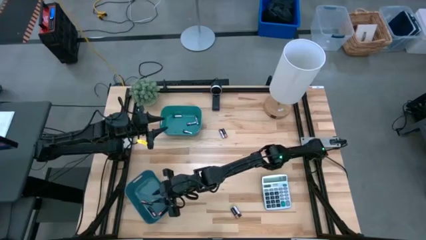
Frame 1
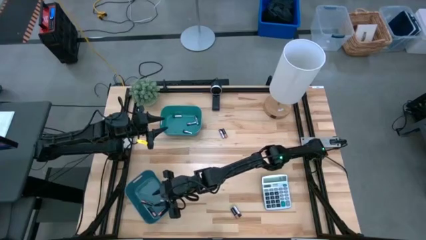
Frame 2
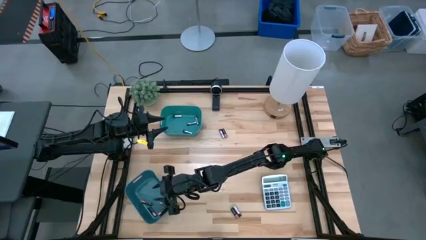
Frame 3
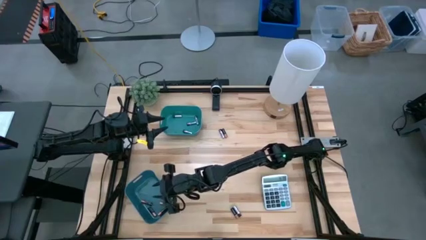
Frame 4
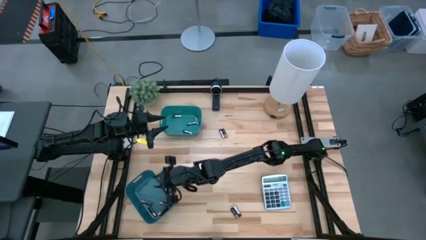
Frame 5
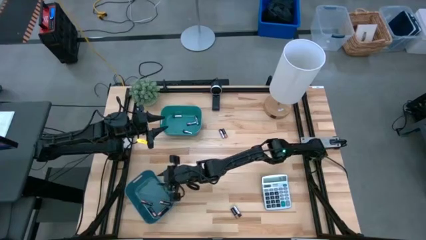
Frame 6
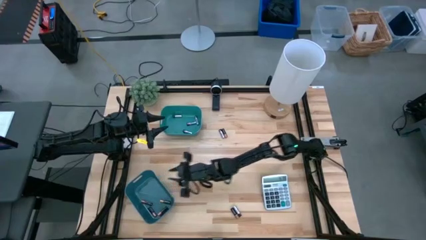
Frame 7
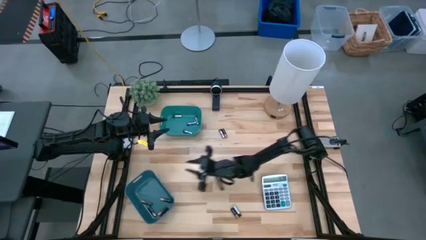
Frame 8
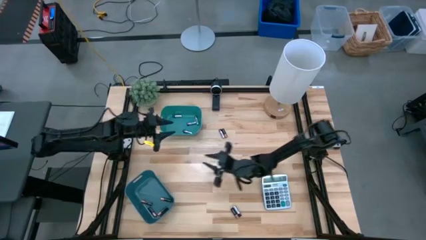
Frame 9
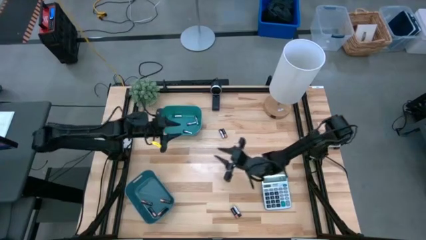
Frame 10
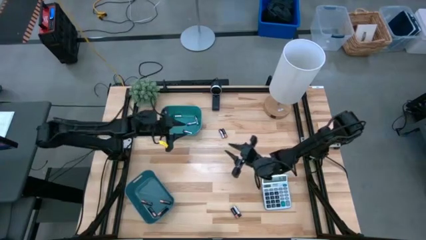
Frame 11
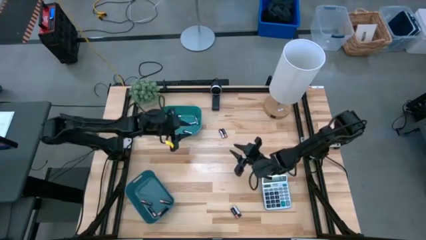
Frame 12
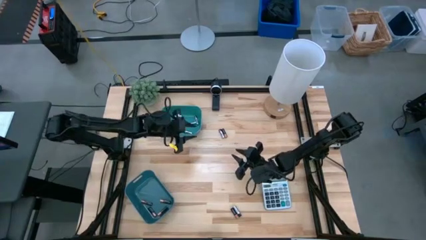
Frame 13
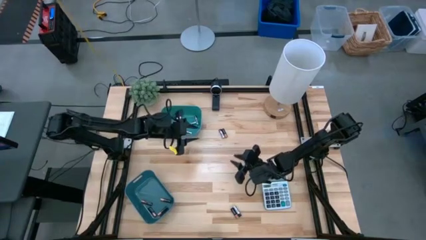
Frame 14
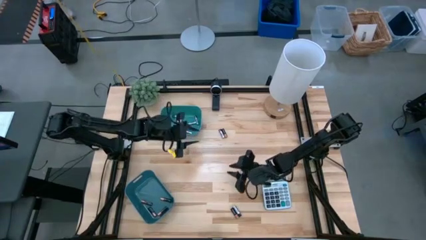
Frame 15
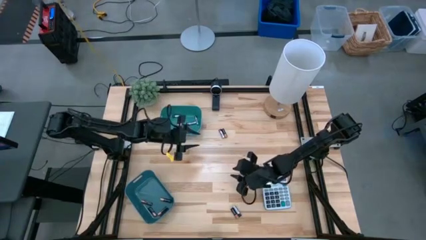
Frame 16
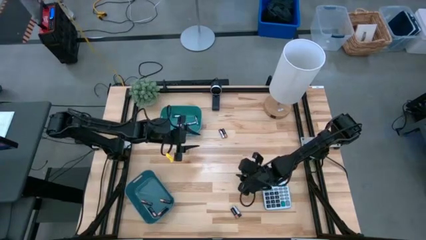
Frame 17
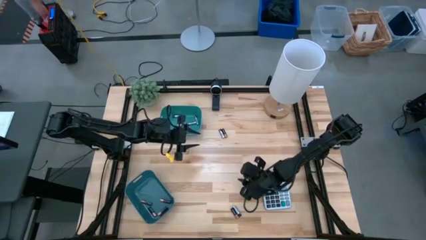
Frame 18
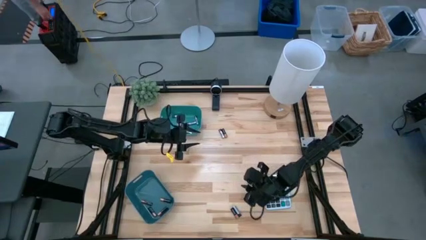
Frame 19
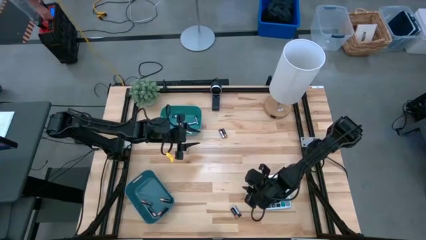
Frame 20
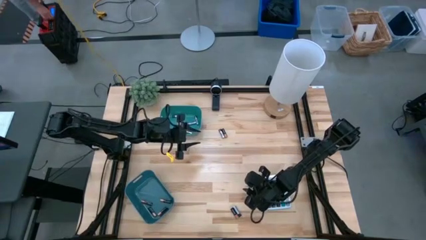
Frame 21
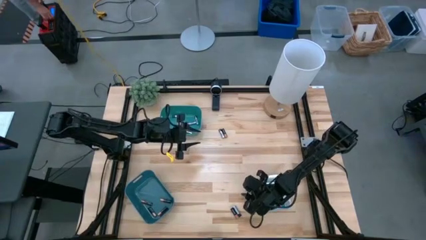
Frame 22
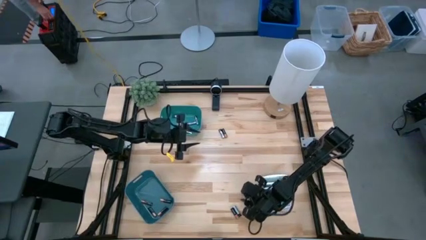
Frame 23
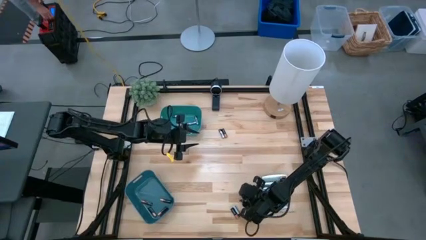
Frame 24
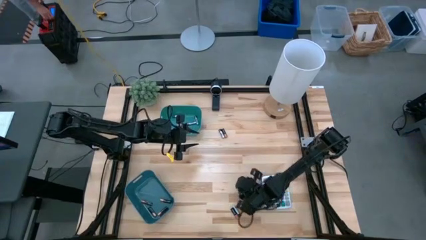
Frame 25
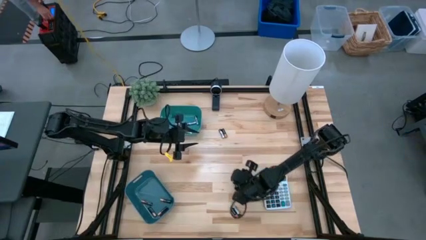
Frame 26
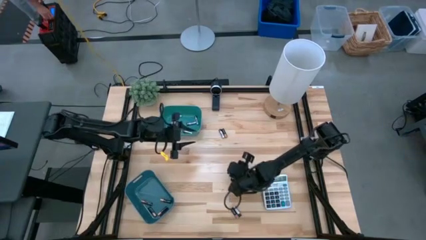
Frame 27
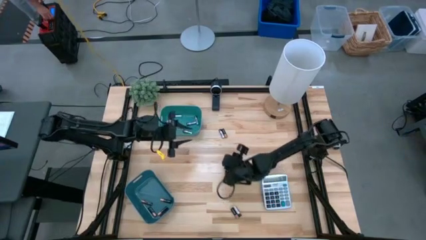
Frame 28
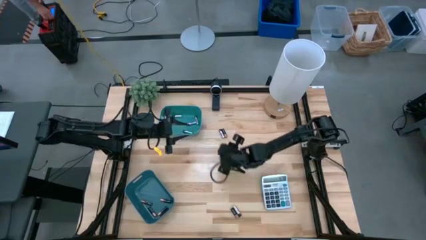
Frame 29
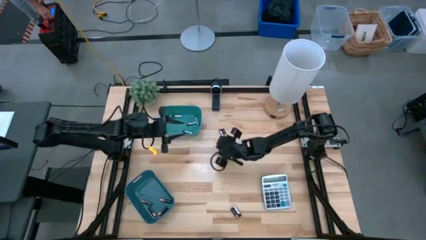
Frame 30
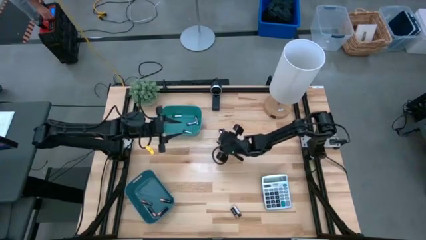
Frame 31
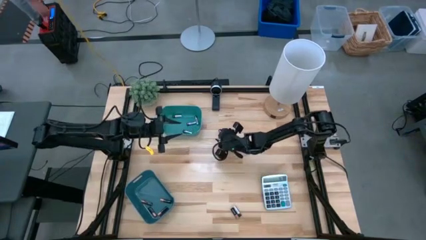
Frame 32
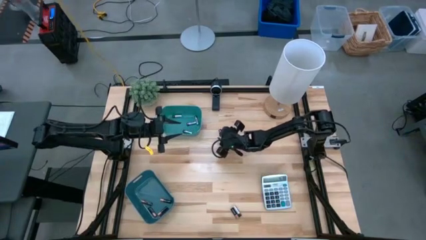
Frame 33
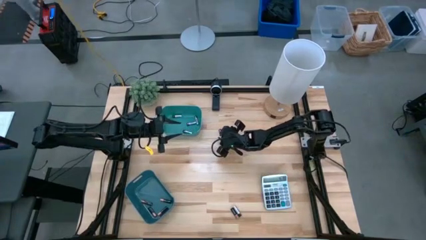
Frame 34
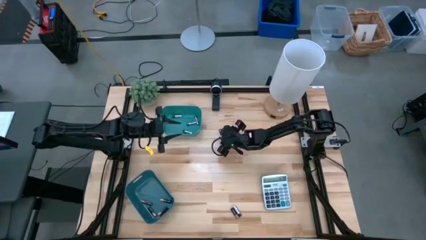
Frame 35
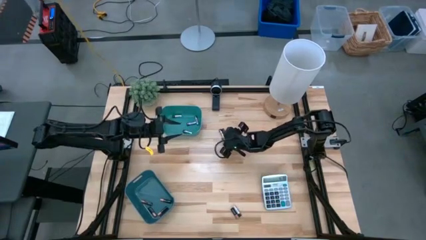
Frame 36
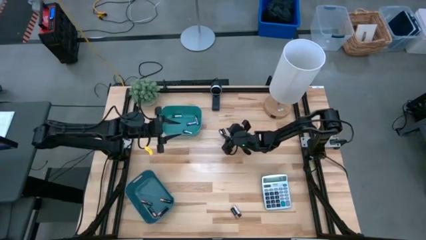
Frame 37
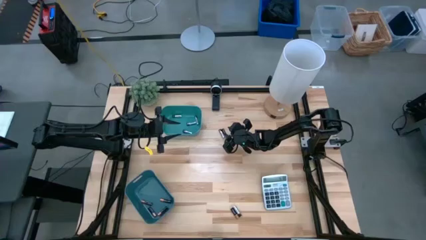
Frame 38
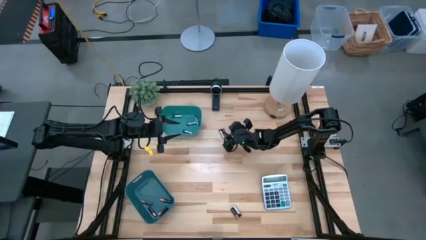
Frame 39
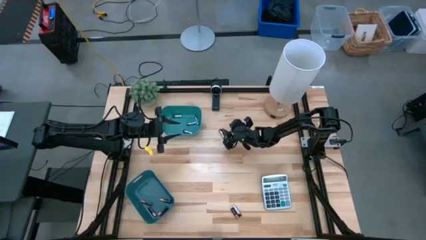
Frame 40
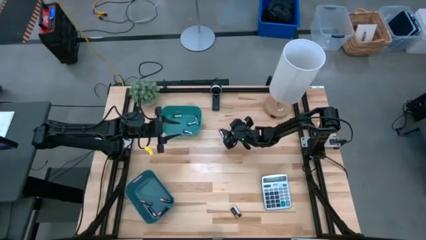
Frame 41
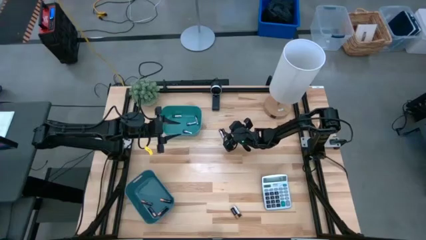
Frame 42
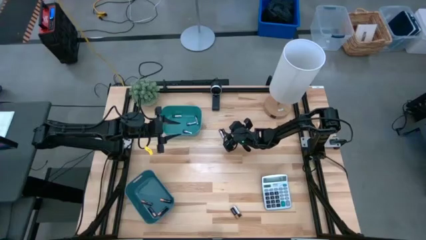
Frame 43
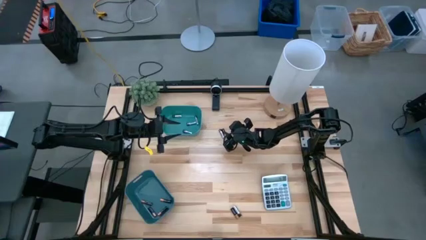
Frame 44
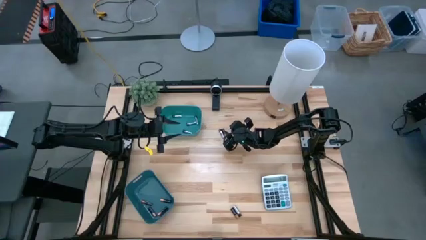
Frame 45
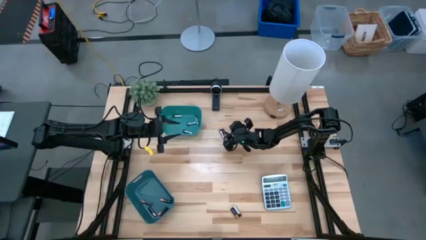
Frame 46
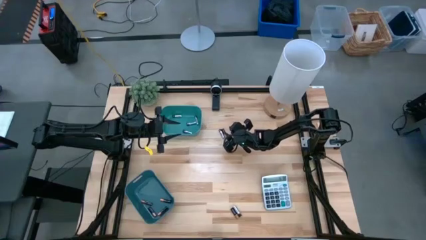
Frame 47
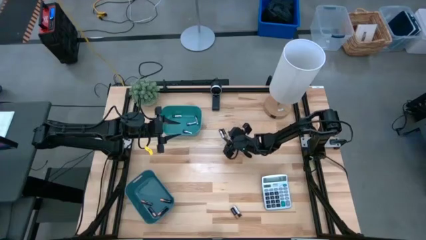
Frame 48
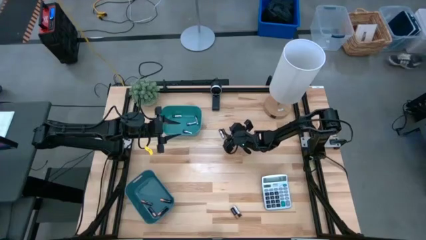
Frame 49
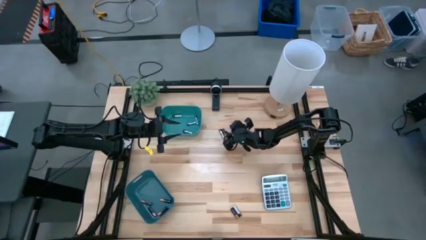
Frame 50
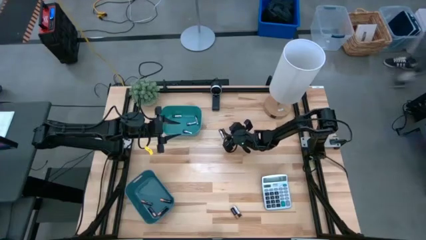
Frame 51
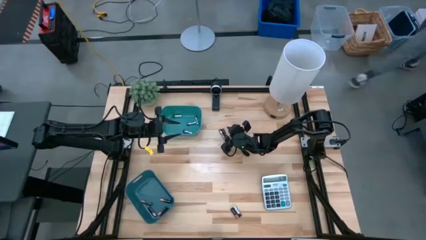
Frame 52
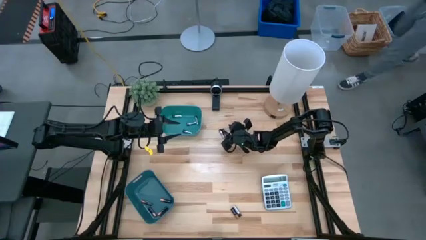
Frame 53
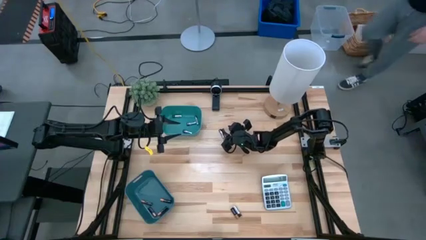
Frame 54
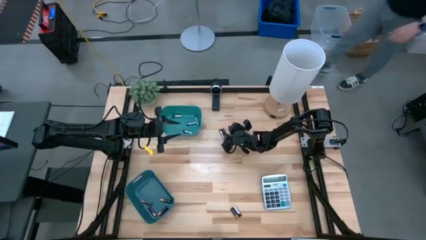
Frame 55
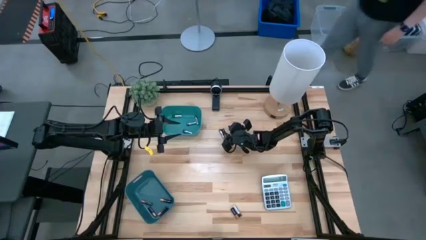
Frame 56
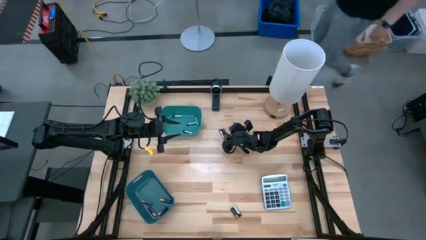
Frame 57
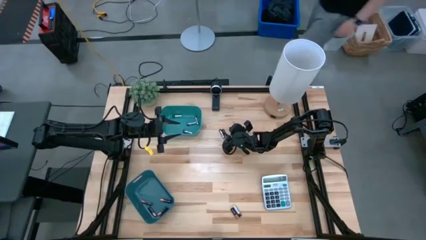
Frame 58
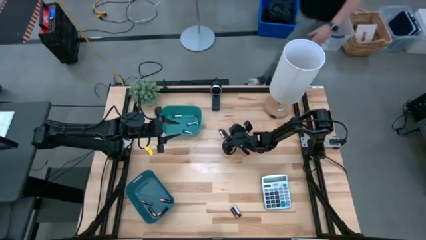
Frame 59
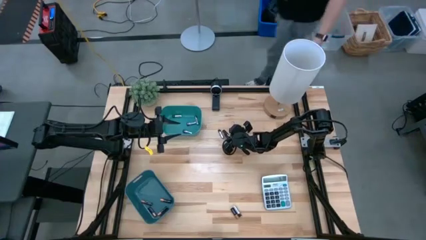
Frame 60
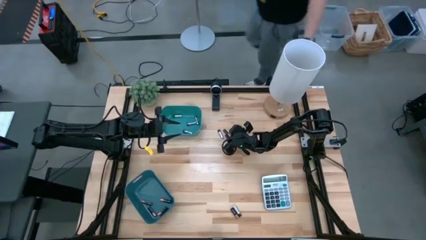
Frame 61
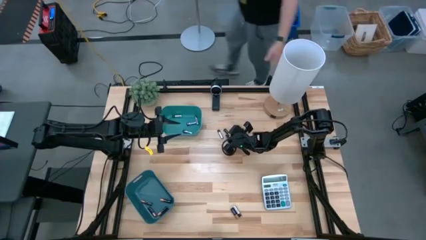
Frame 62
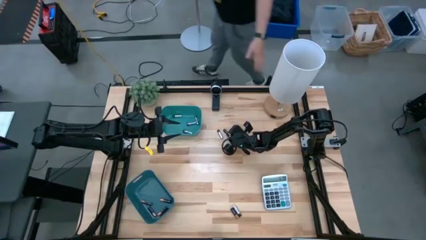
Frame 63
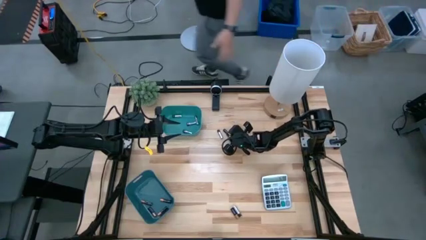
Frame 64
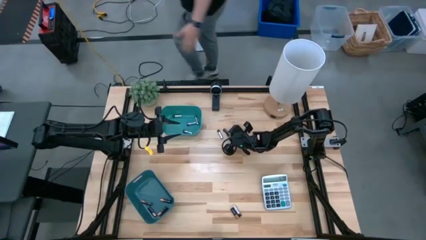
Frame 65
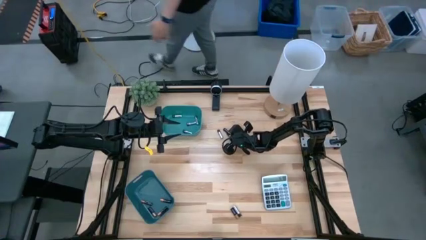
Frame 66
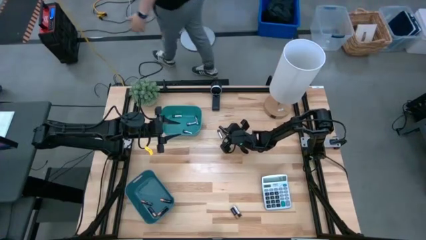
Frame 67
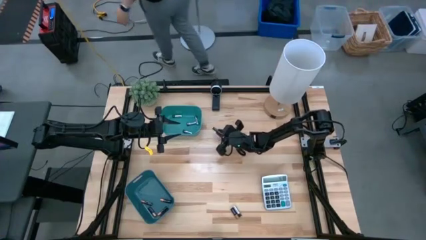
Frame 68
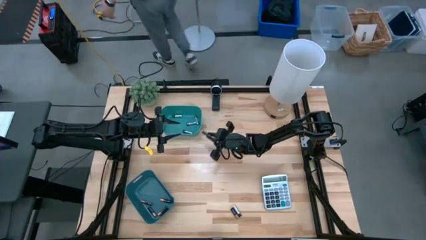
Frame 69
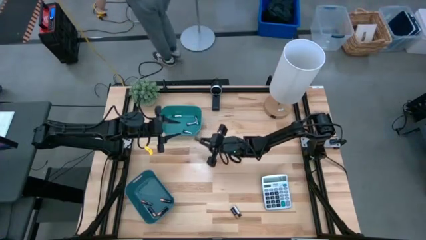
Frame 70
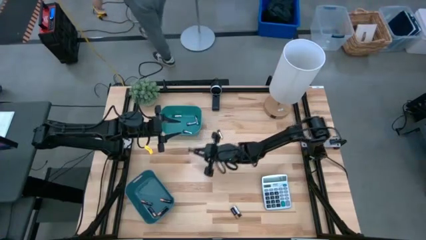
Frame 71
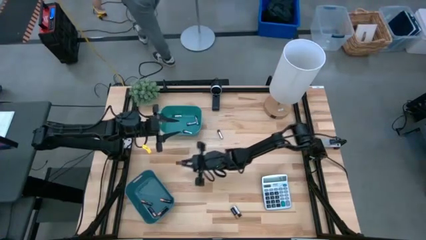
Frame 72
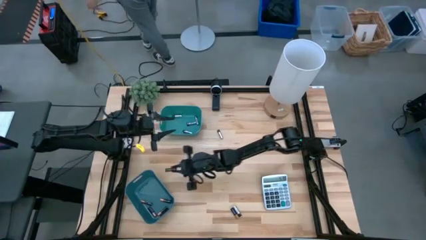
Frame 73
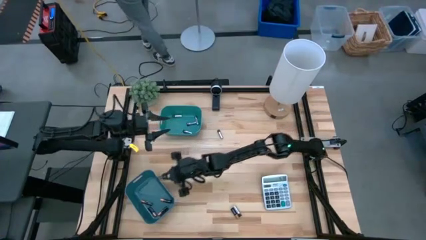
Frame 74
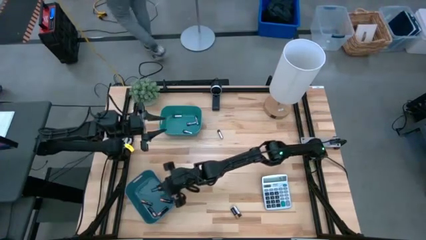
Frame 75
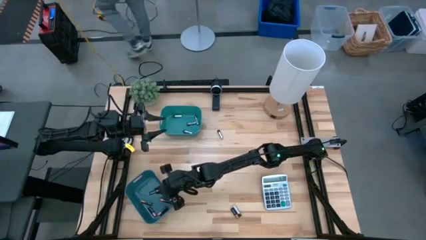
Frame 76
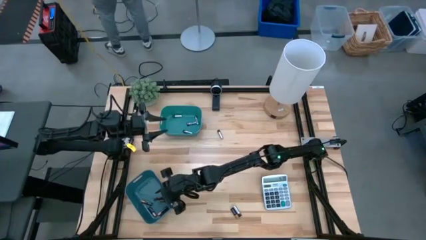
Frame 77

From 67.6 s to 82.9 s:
Task: Sort batteries
Put the top black battery into the blue bin
